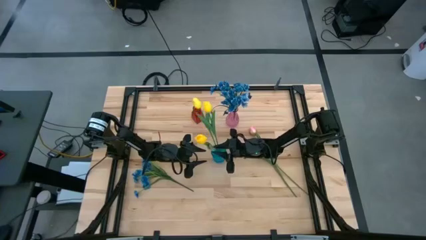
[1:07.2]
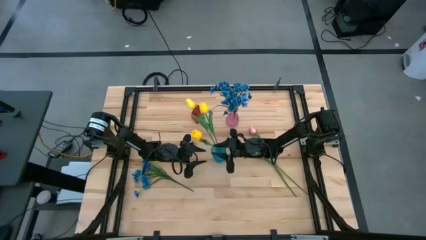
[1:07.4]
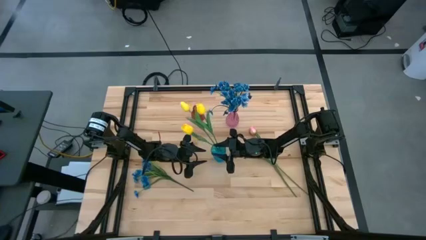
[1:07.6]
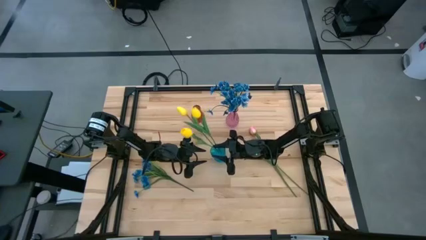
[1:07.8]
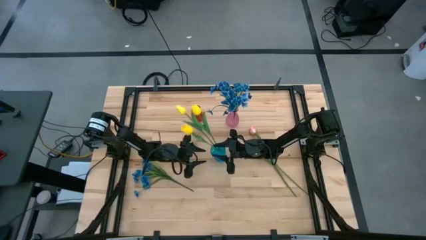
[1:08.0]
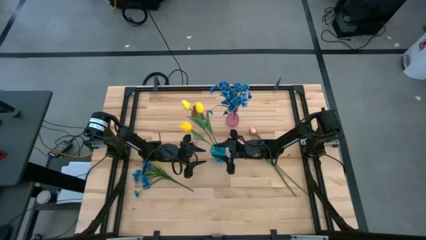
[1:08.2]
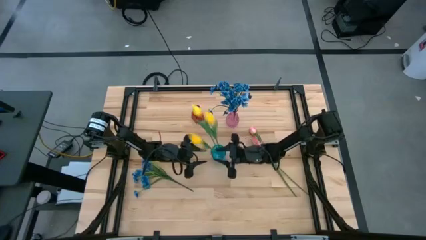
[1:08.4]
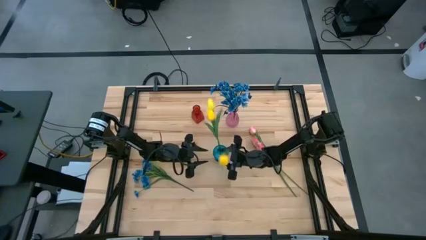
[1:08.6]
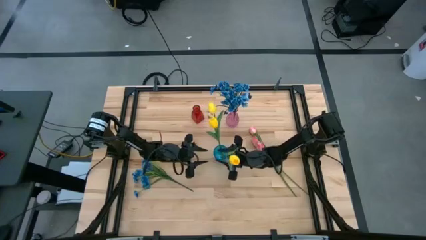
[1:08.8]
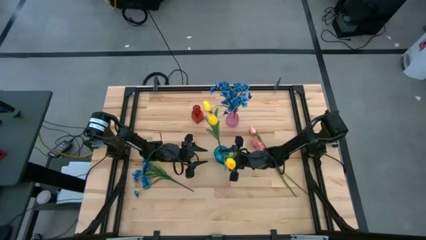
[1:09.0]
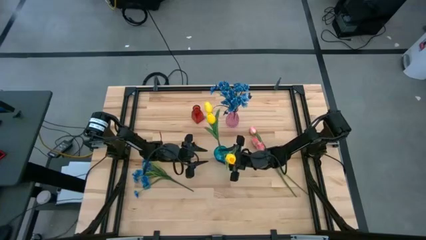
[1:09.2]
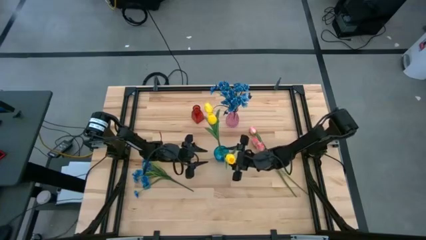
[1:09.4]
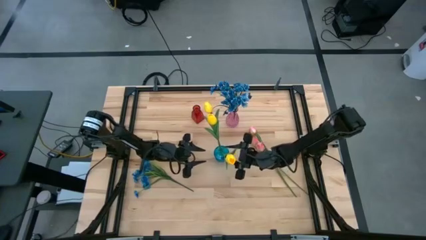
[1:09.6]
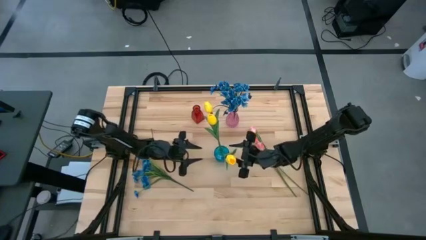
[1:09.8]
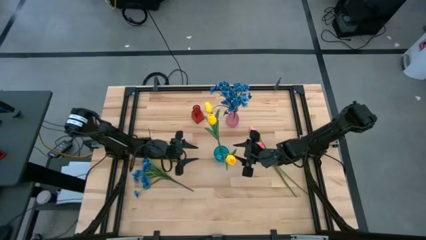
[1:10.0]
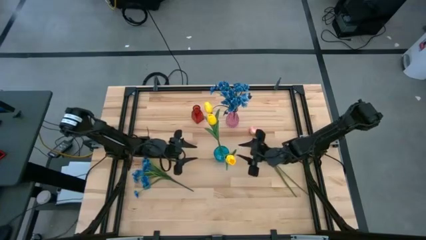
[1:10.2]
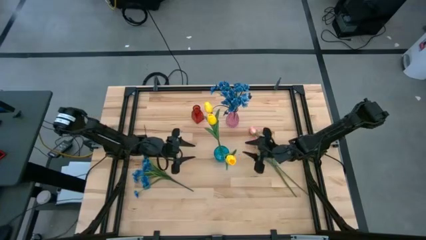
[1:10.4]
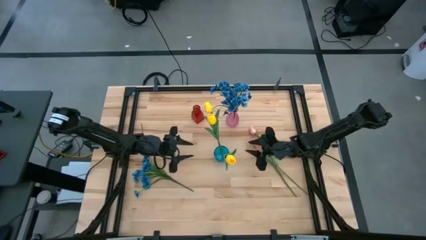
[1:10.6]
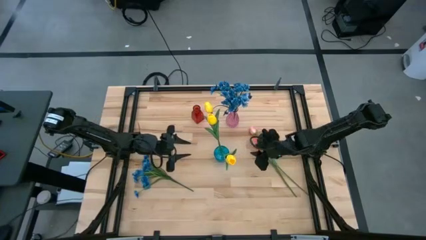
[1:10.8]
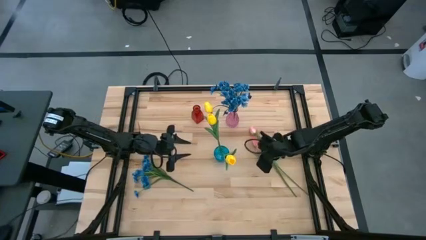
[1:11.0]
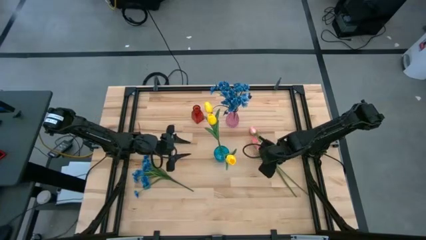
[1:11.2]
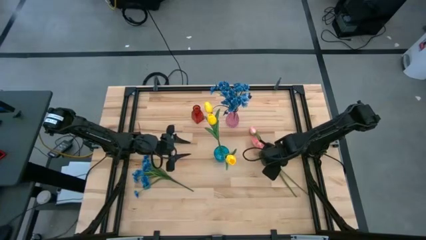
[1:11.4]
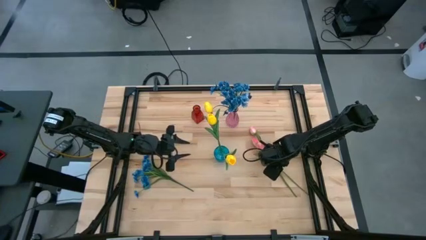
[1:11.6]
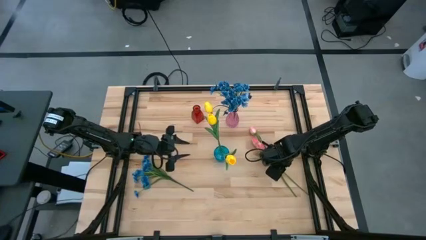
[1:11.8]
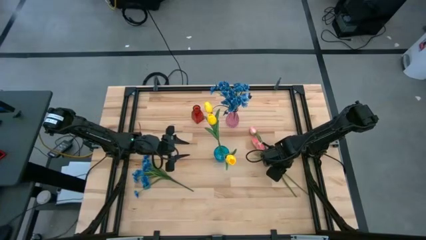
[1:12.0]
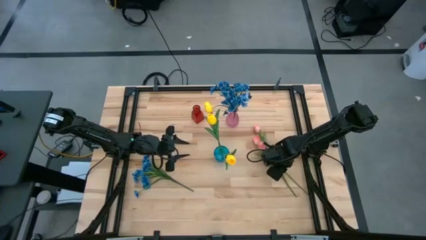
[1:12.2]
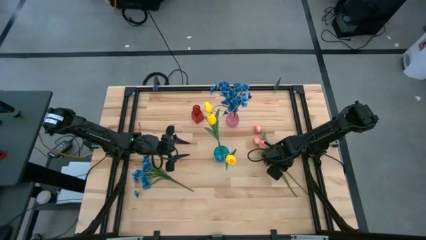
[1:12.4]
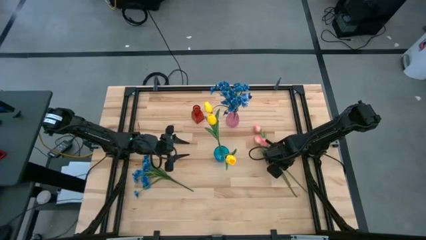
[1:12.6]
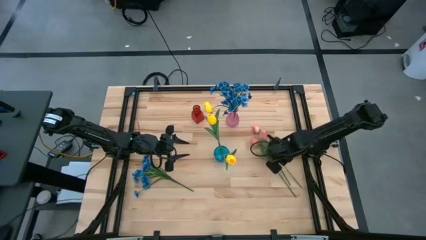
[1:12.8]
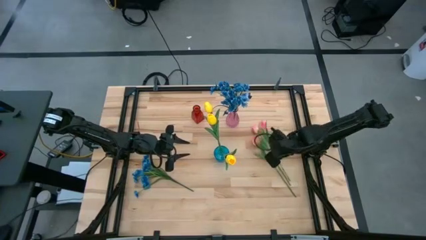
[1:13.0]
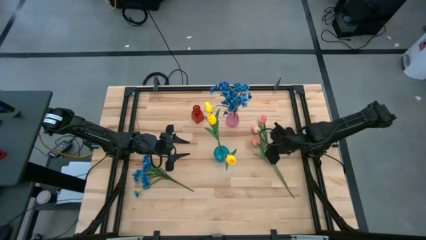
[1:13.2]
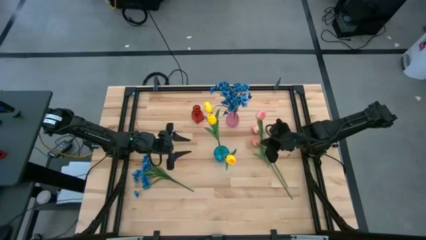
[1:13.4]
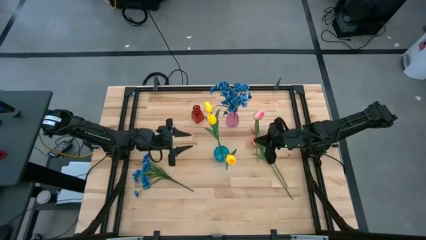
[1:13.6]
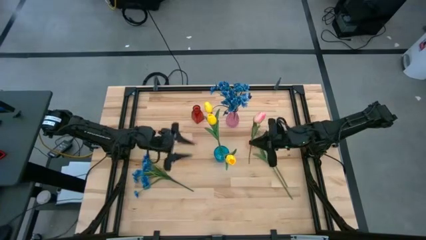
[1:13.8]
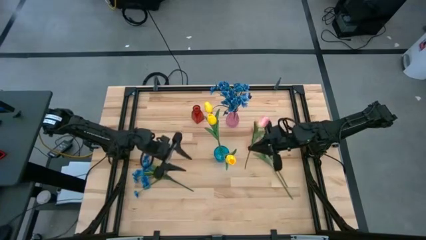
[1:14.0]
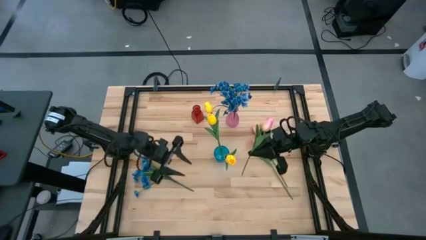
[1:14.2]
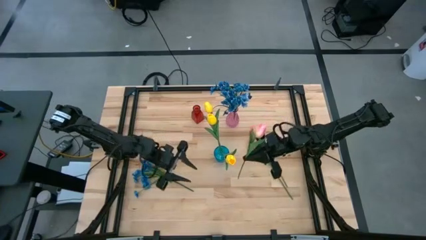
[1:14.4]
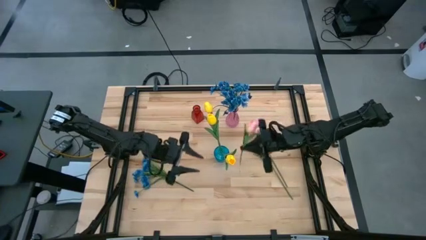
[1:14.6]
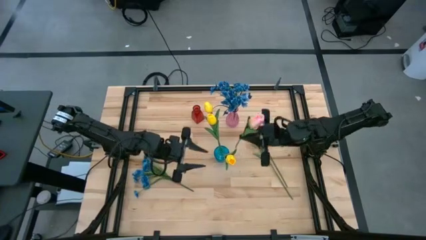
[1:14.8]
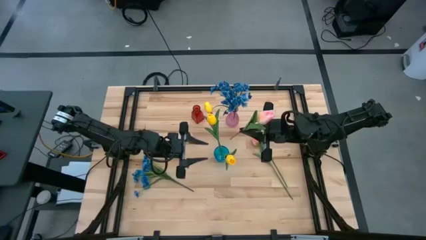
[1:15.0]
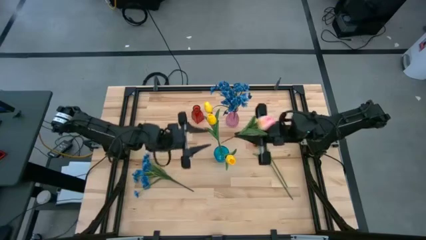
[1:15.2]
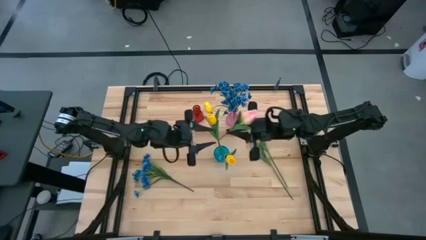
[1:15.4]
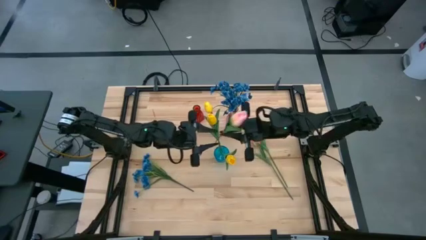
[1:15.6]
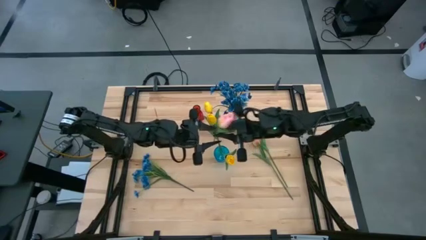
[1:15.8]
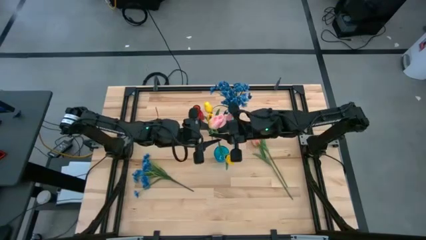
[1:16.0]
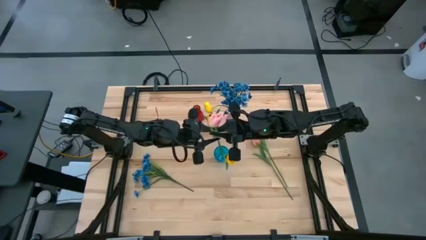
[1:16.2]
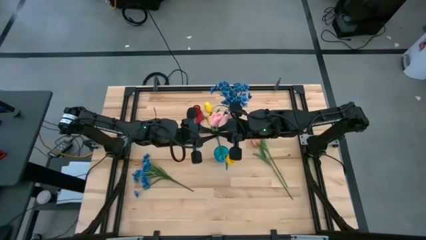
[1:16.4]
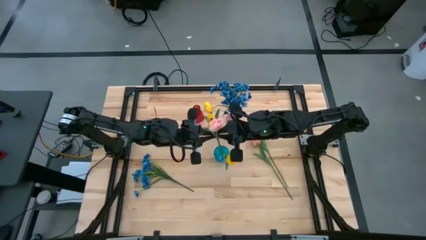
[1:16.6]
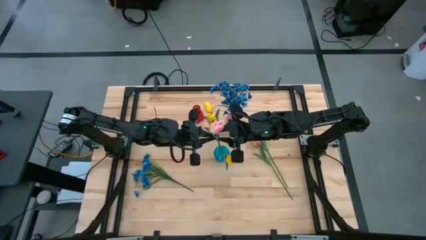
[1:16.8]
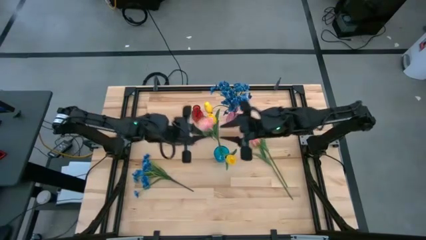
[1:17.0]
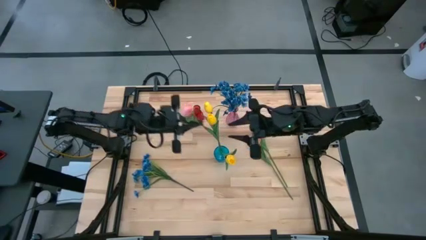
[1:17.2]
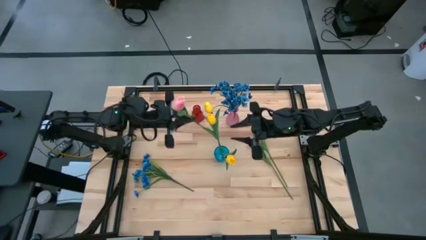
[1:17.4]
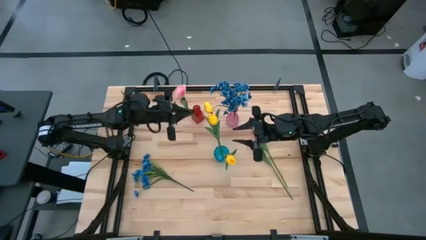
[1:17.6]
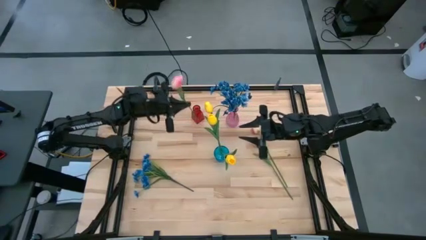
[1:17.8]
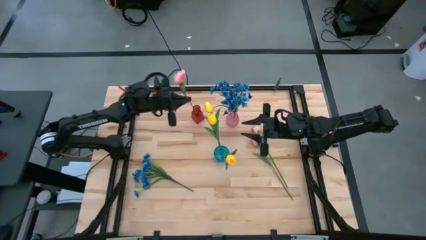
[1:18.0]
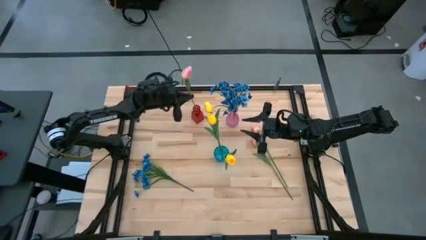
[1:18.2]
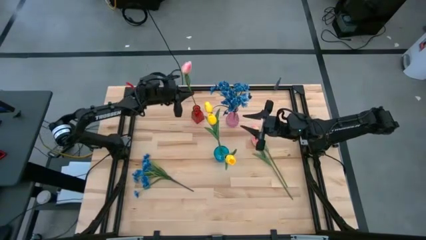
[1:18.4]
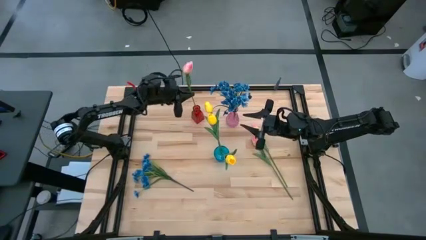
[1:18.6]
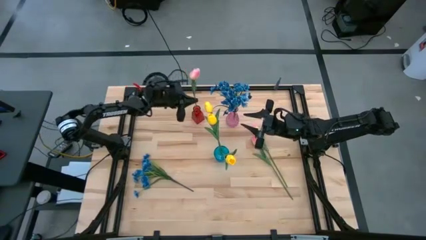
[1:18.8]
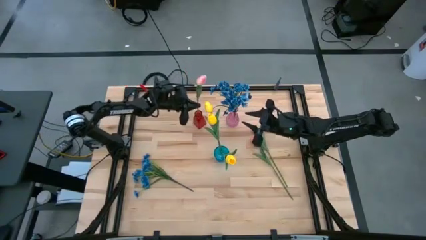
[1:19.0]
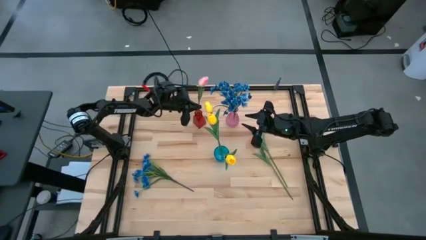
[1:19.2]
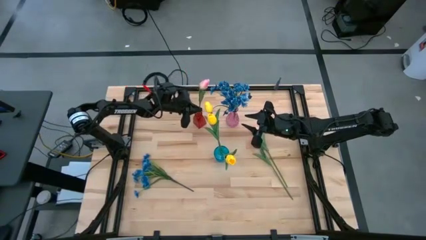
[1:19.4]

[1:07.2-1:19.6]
Task: Sort flowers into vase by color
Put the bottom pink flower into the red vase
